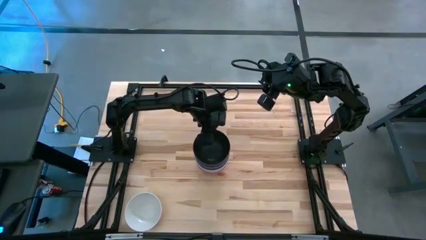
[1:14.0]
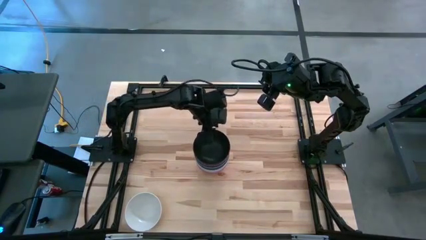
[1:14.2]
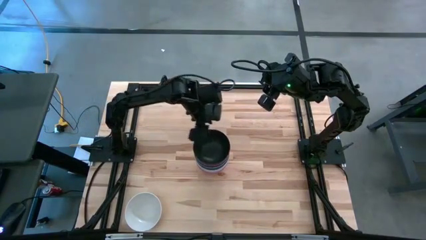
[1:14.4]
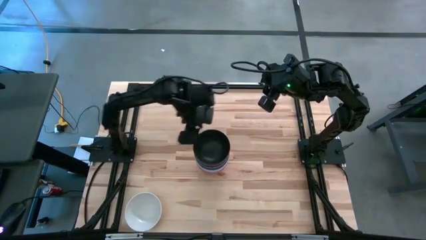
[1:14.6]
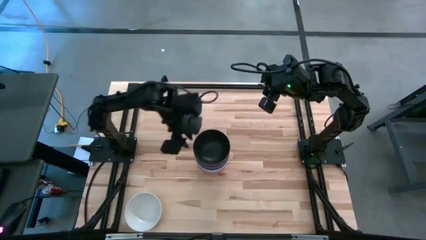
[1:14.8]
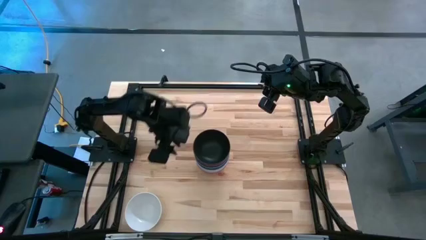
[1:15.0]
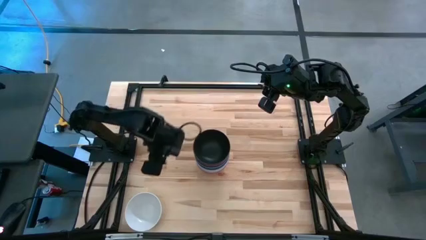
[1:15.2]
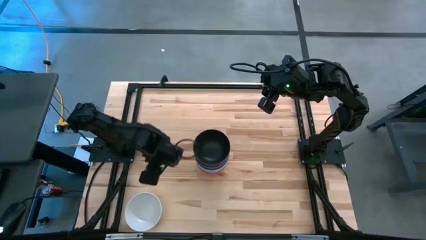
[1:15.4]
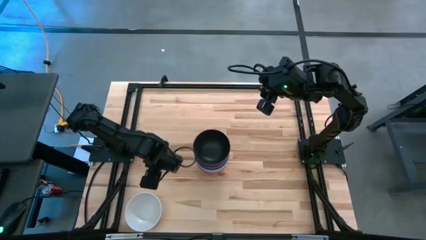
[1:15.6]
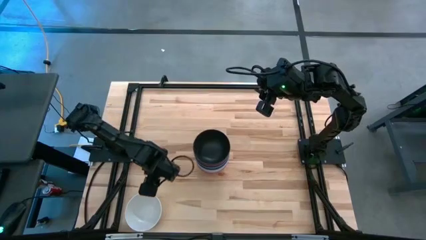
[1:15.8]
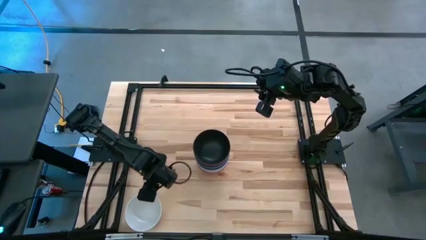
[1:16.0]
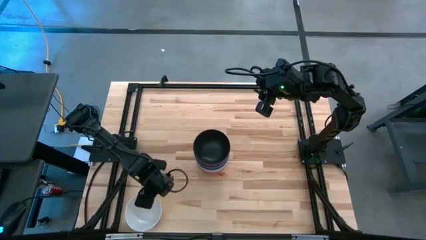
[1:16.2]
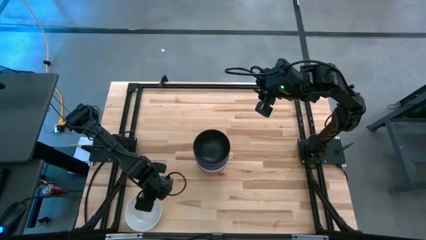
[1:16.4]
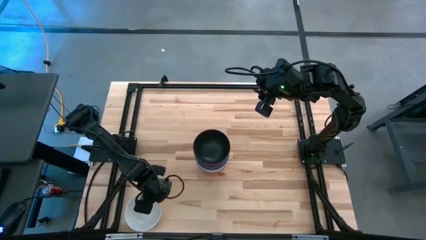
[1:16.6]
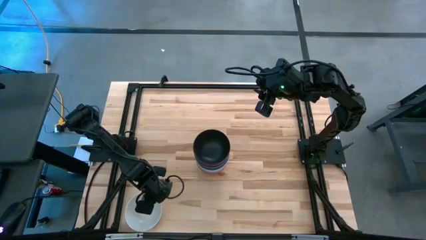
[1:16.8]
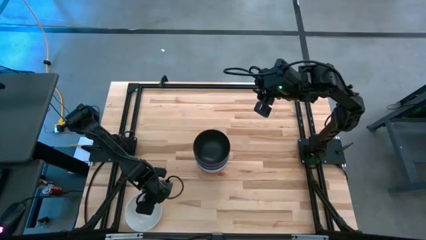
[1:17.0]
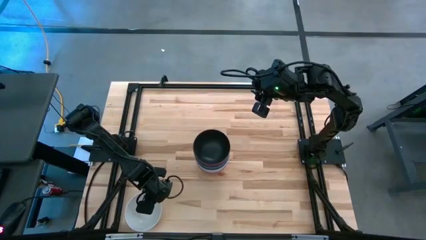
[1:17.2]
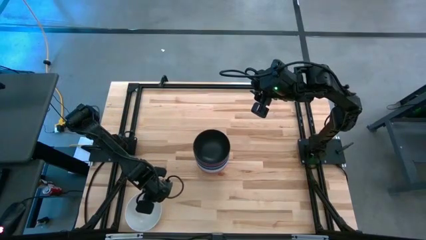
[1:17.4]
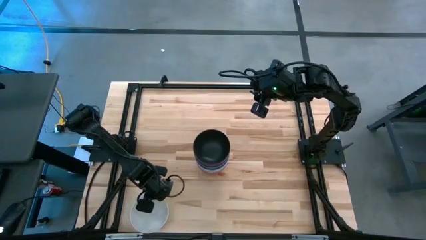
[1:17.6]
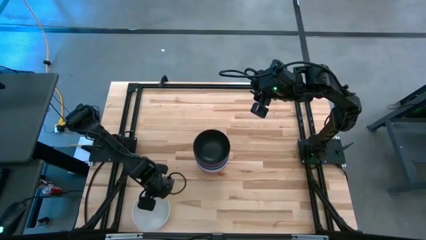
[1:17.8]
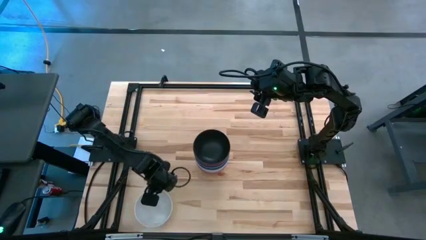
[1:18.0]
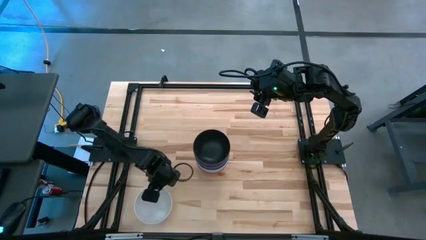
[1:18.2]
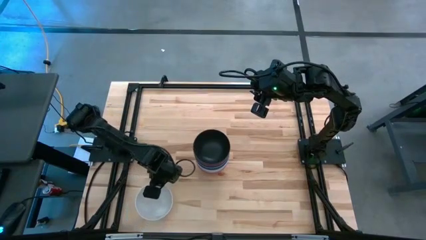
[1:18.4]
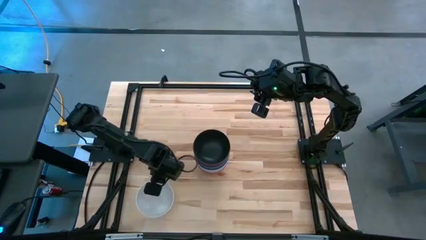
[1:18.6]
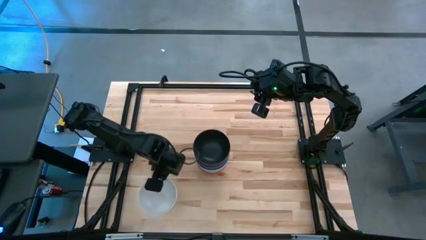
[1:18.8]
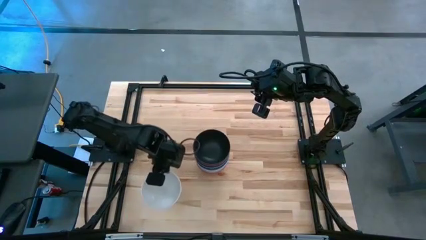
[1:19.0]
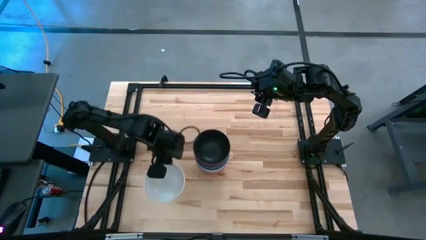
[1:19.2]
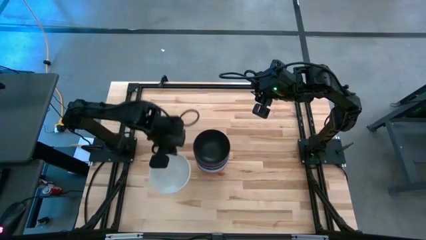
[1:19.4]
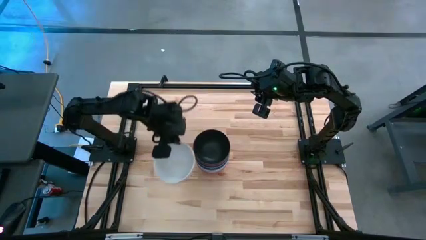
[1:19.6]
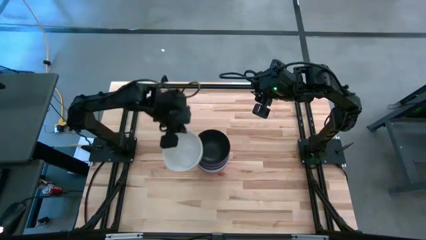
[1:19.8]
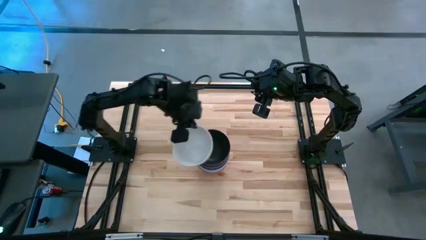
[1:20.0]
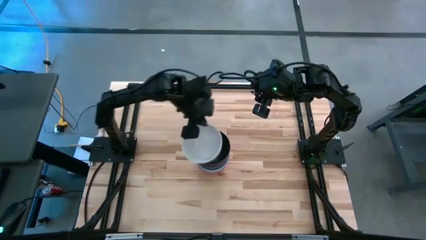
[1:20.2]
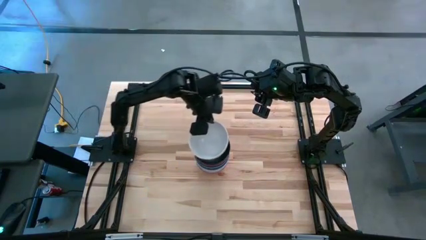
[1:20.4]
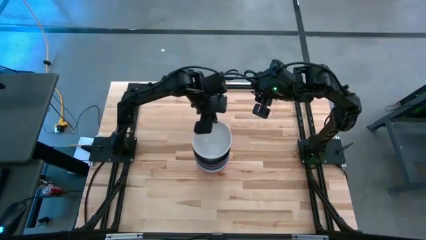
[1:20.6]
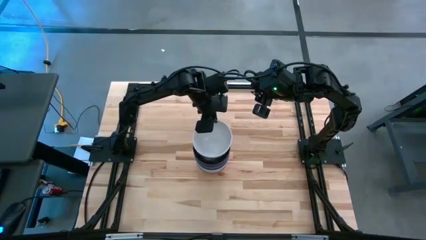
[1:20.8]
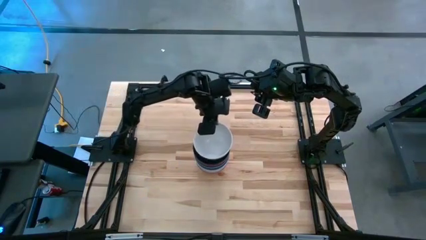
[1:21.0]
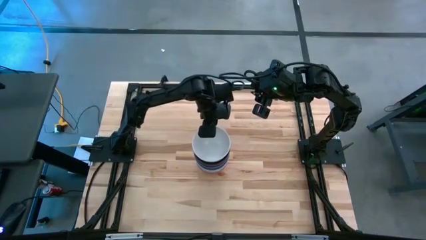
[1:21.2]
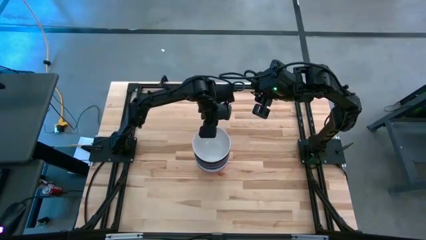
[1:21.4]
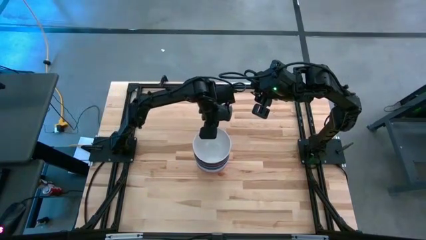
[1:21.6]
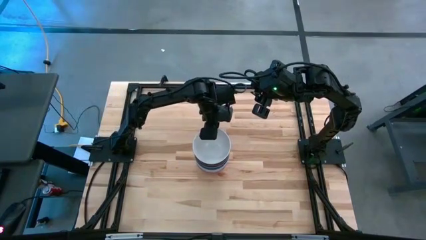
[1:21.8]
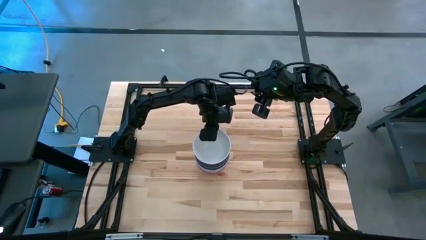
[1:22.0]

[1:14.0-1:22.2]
Task: Nest bowls inside each other
Stack the white bowl on the black bowl

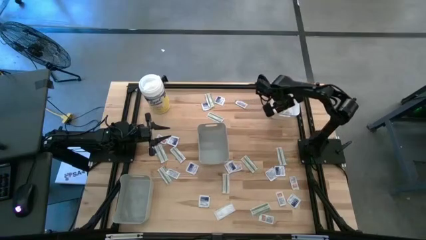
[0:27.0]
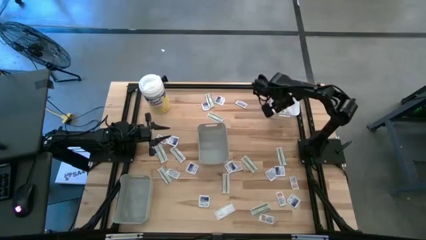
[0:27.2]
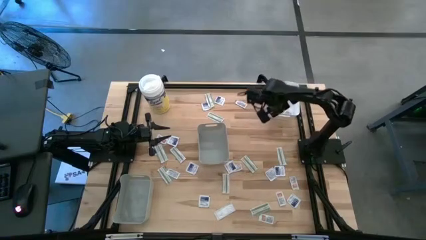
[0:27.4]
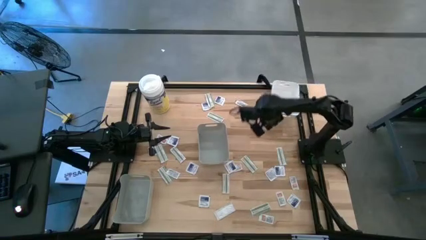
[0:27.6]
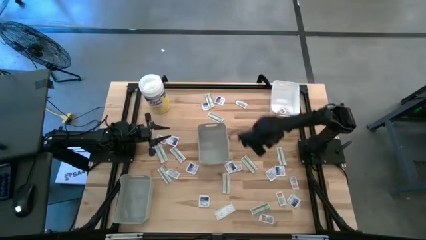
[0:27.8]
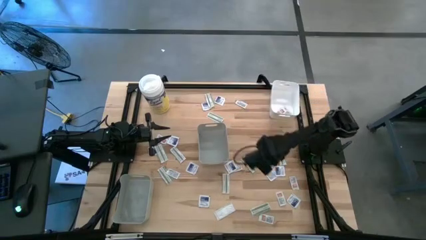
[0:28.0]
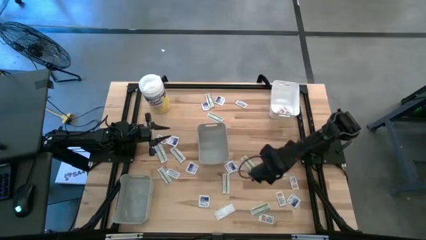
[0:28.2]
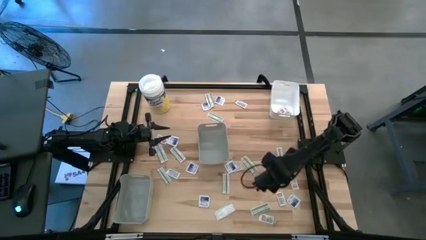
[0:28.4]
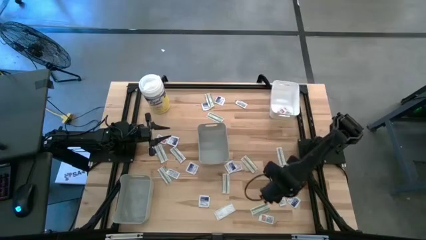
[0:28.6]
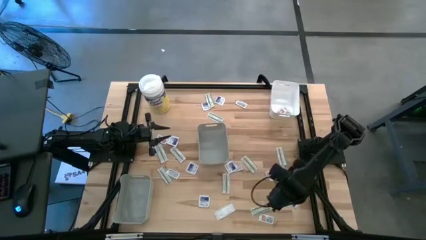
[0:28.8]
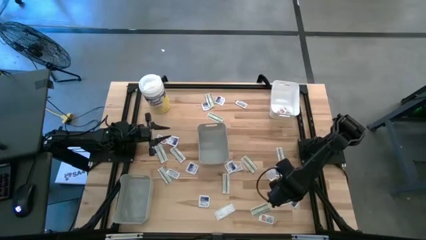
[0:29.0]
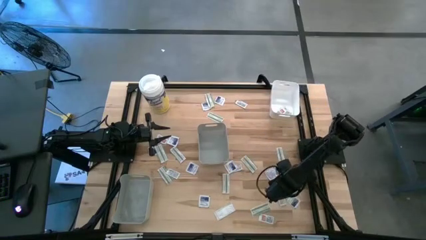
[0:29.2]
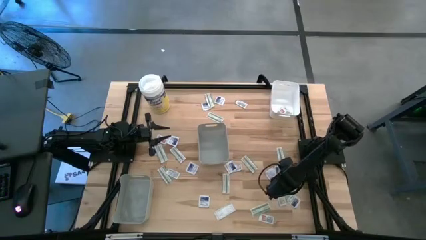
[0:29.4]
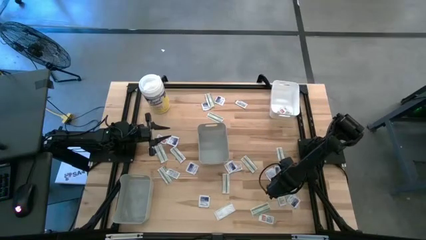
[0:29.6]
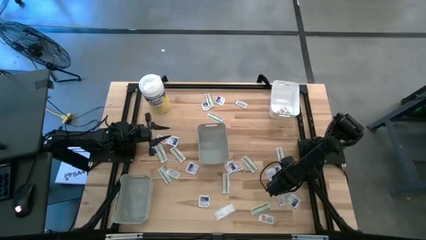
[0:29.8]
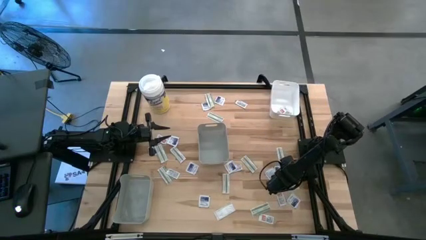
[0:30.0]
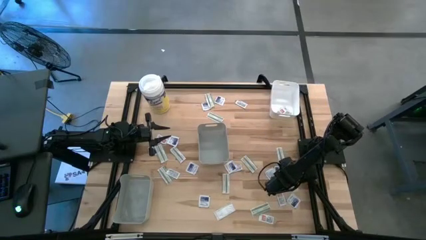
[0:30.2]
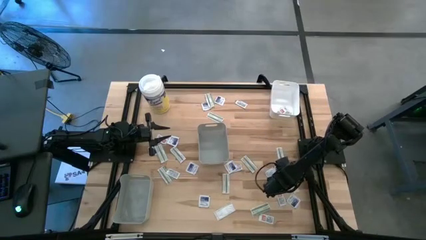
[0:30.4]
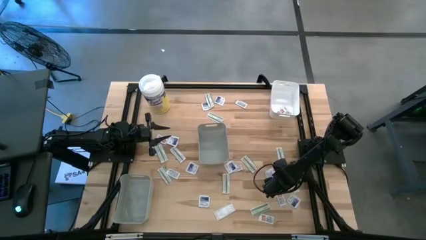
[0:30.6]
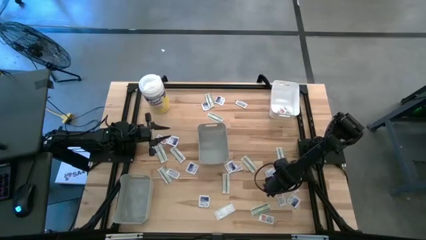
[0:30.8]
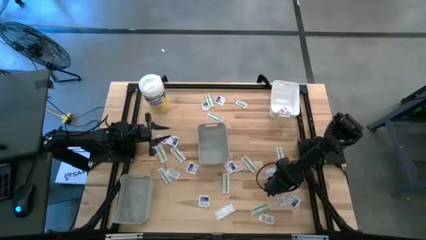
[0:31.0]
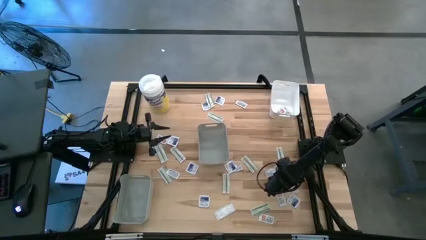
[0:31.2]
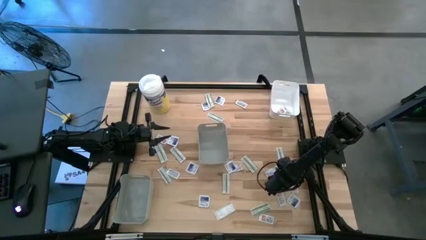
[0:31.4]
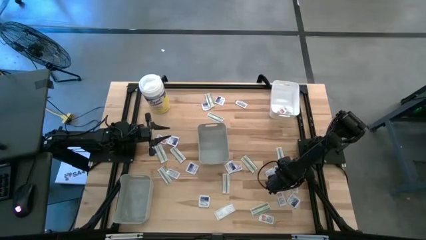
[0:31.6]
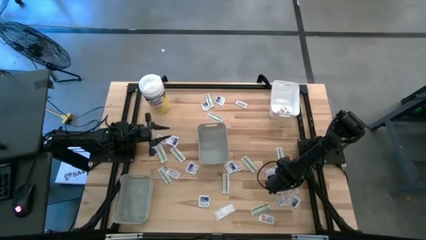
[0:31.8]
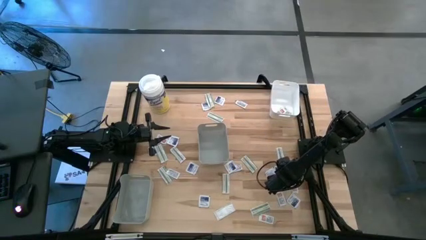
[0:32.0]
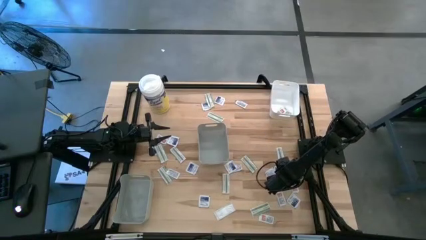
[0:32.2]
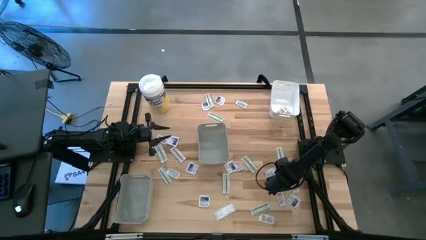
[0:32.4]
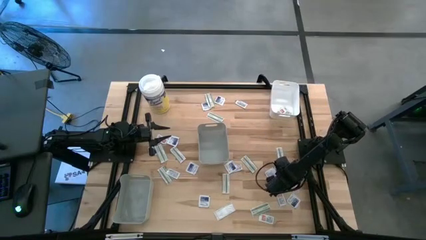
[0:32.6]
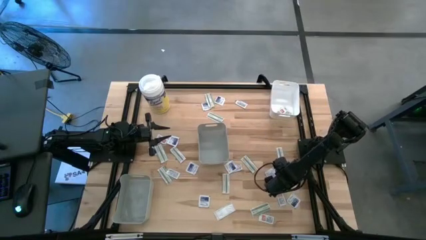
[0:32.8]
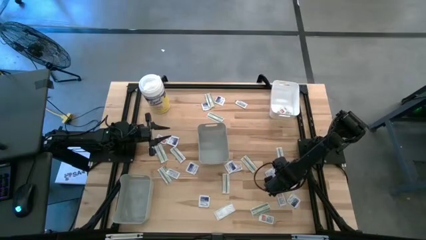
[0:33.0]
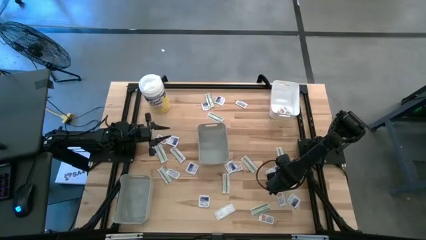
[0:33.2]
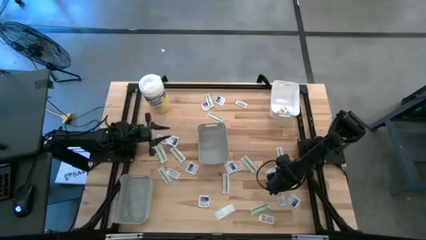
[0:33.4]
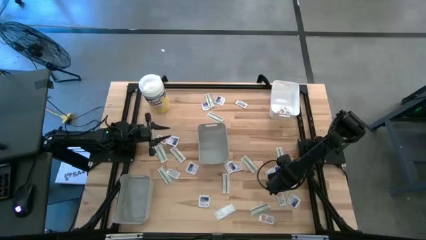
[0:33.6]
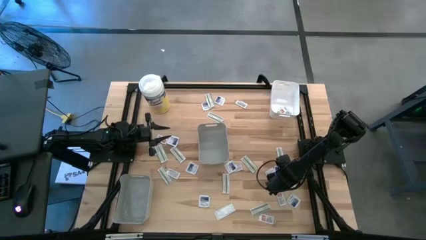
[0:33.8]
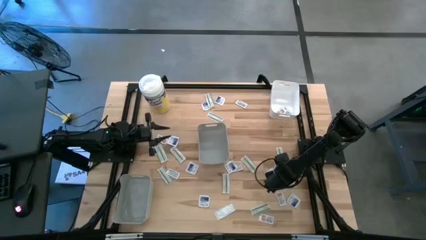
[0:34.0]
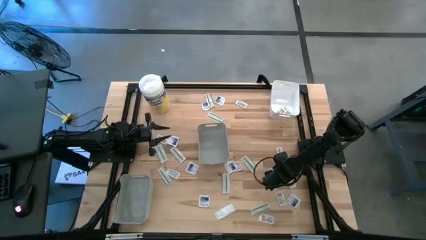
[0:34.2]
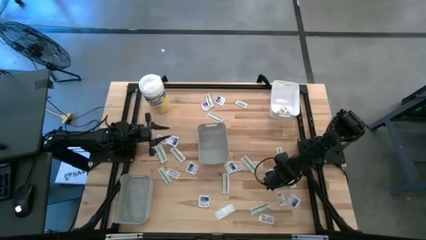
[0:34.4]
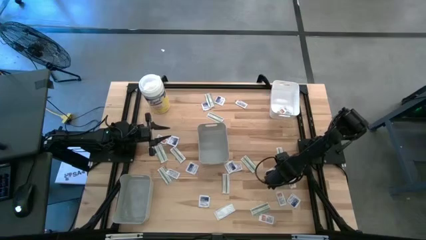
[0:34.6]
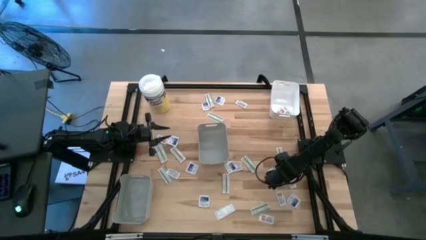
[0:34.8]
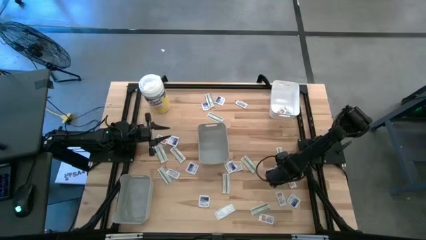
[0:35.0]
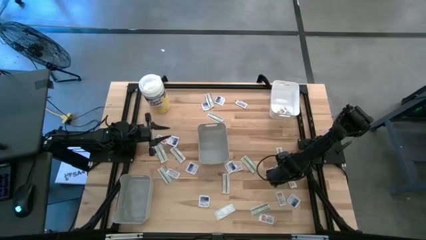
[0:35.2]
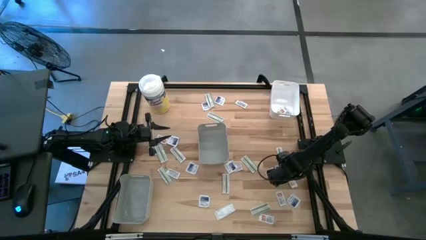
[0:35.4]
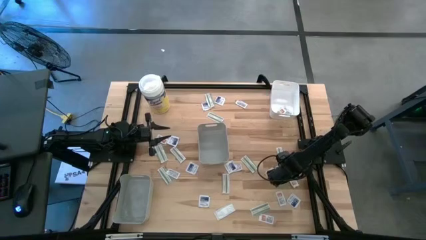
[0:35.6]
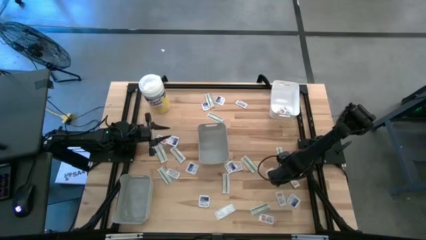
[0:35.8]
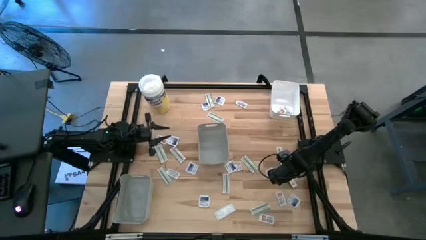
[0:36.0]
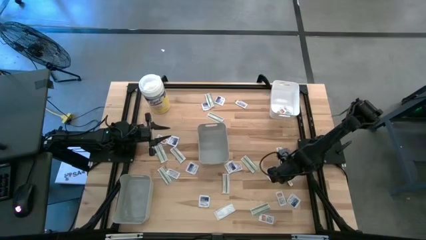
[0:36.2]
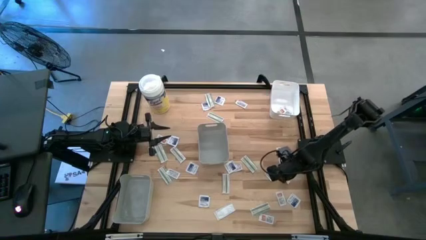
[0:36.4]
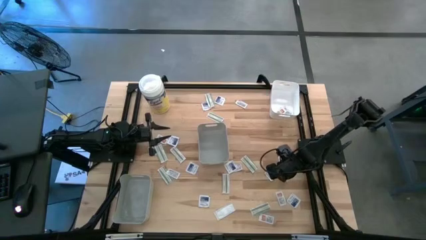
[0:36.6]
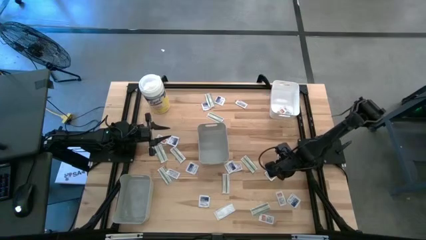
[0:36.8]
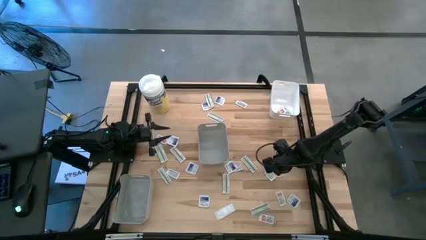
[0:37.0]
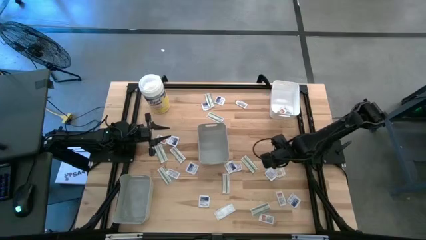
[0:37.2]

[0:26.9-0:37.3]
Task: Pick & Place First Aid Supplies
Put the orange pad into the white bin
